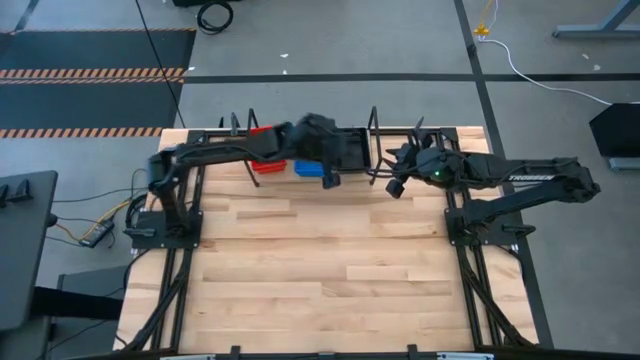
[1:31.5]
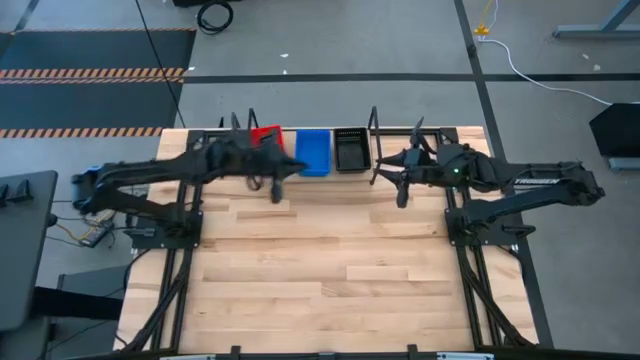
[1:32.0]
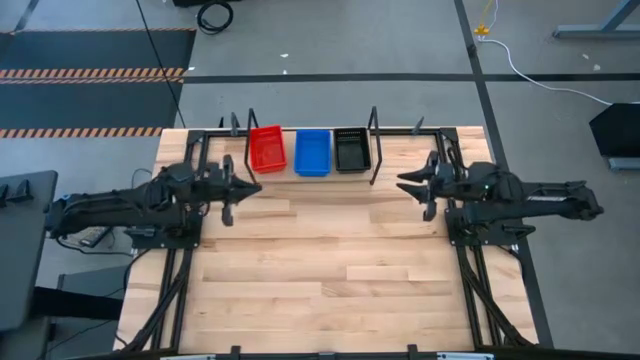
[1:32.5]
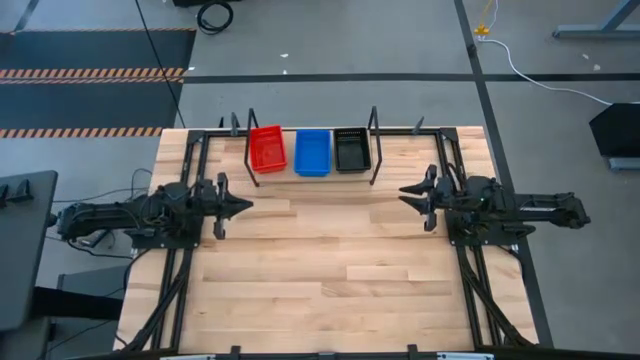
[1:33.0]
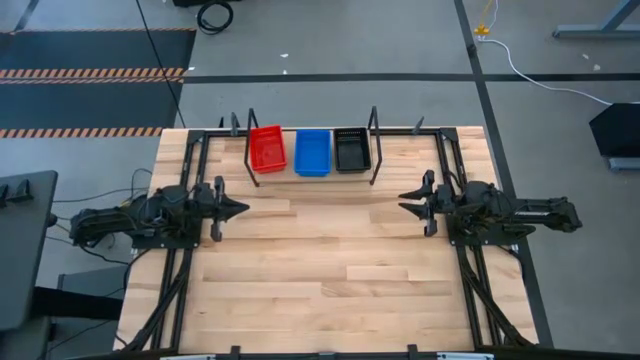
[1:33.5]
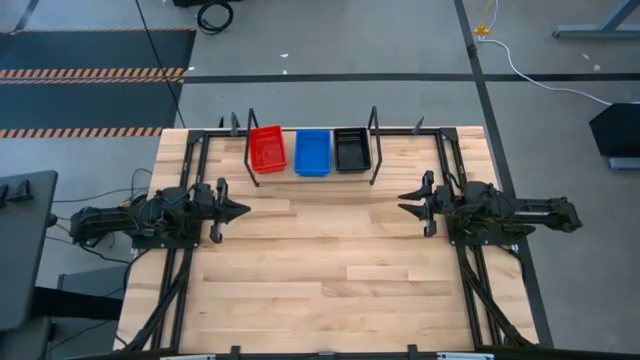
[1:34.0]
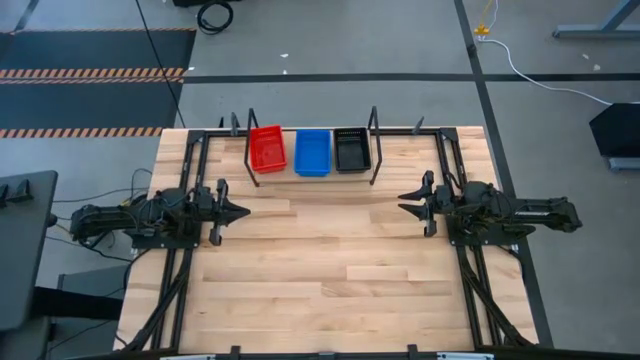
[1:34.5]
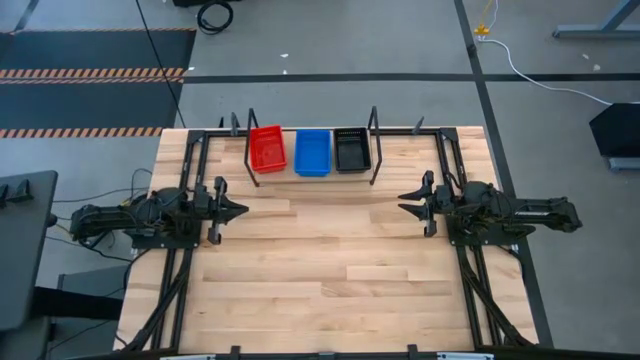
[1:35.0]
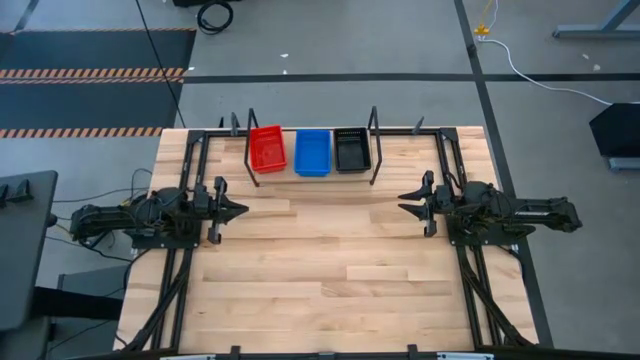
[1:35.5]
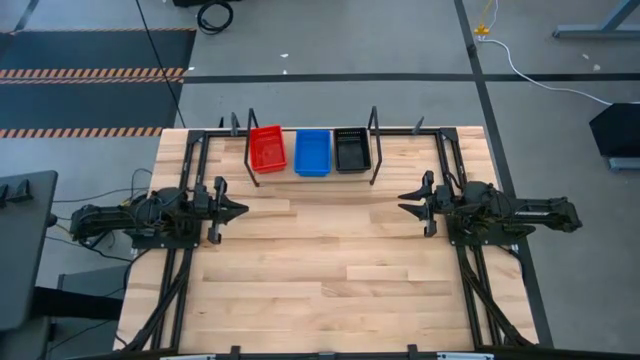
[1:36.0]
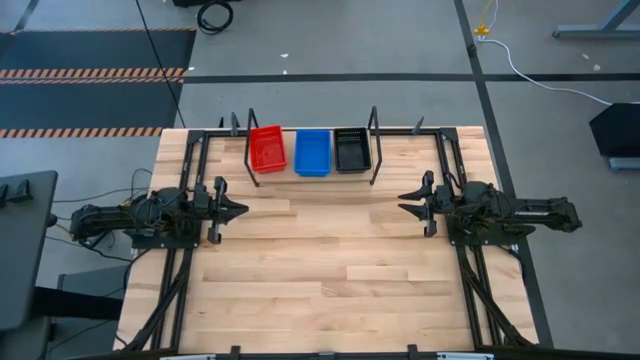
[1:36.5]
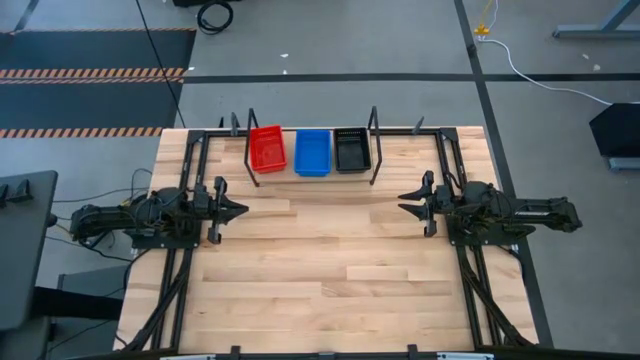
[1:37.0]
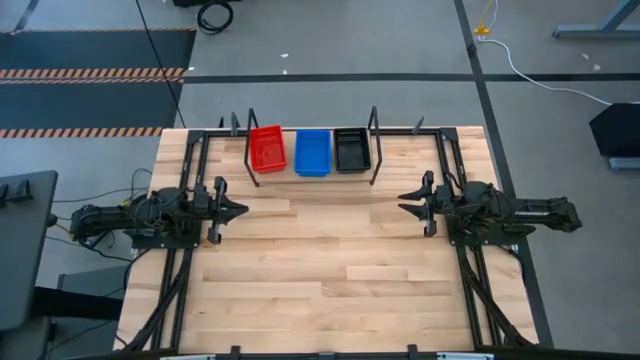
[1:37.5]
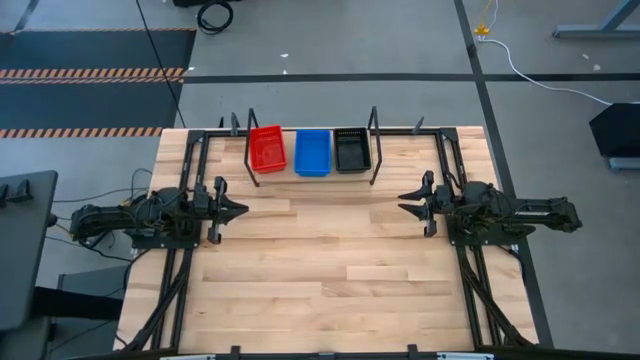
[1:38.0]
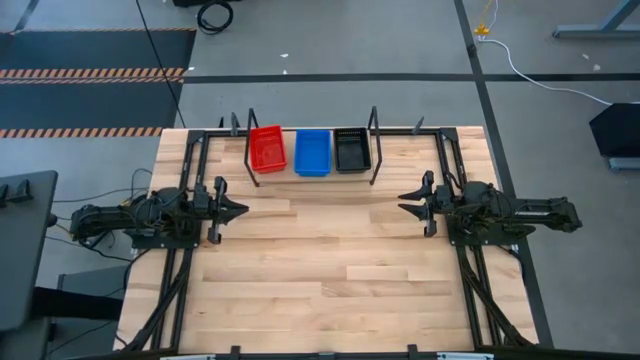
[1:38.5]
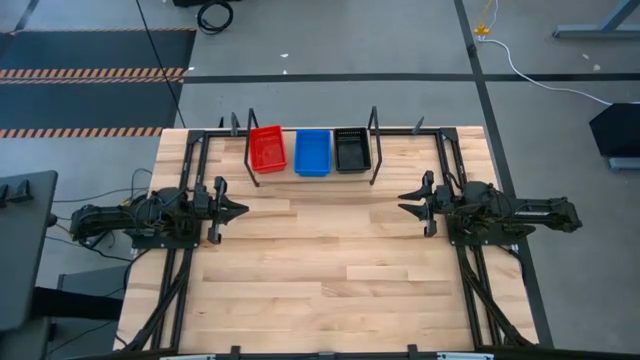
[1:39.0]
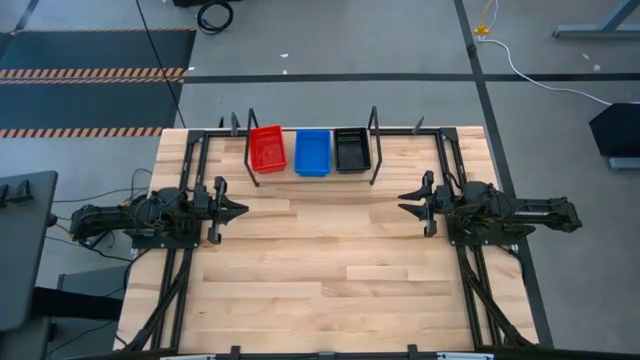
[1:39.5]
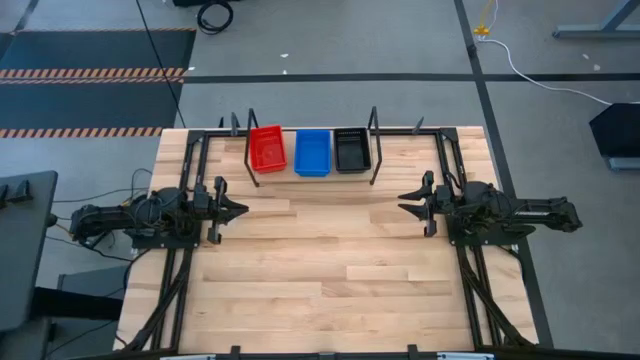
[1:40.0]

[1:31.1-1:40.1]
Task: Stack baskets on shelf by color
Return to Home Position

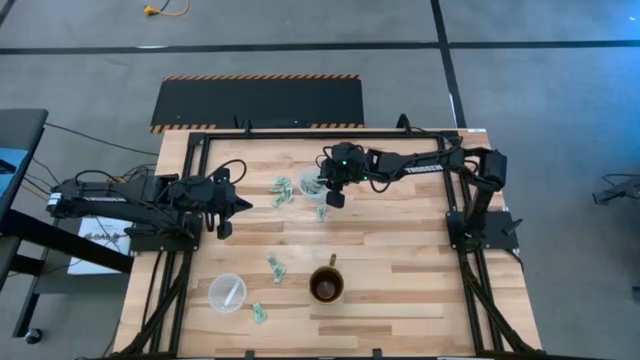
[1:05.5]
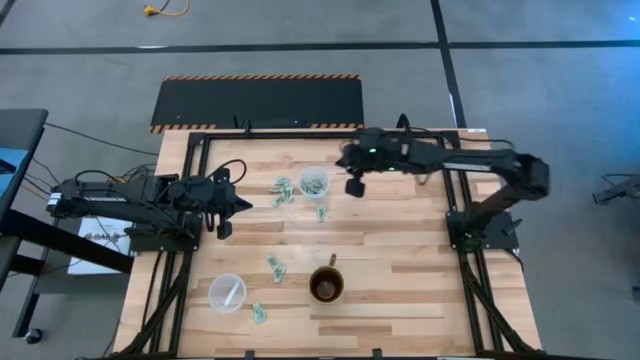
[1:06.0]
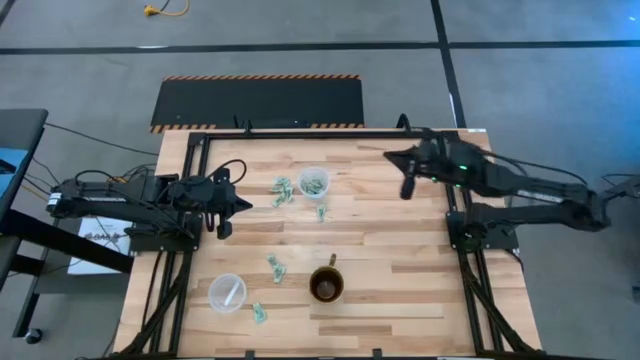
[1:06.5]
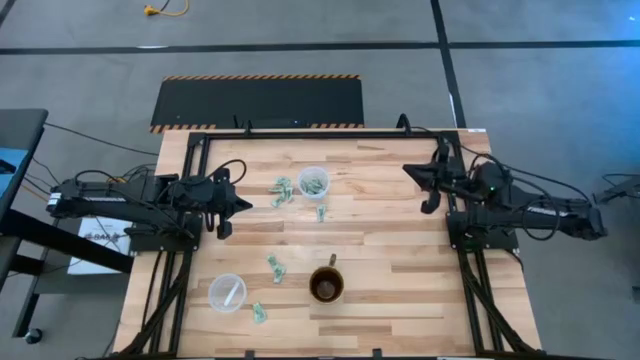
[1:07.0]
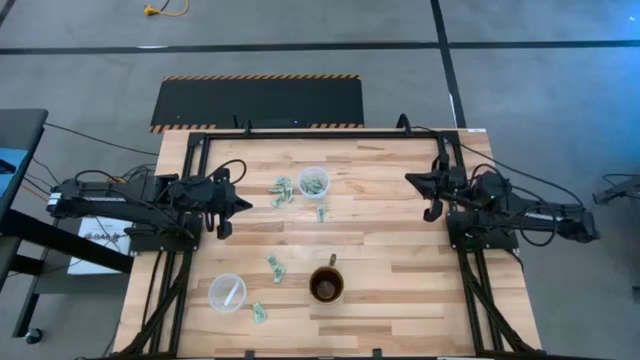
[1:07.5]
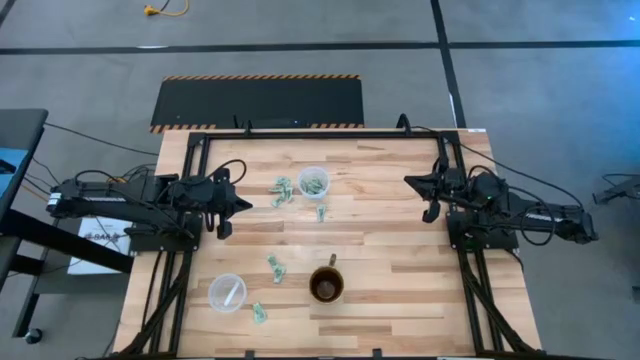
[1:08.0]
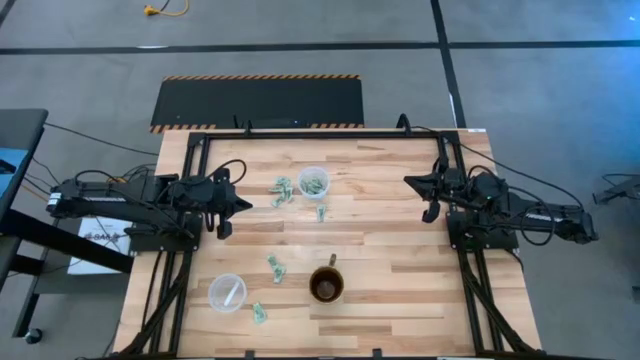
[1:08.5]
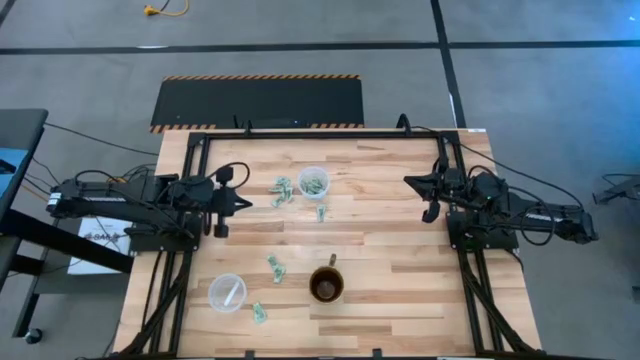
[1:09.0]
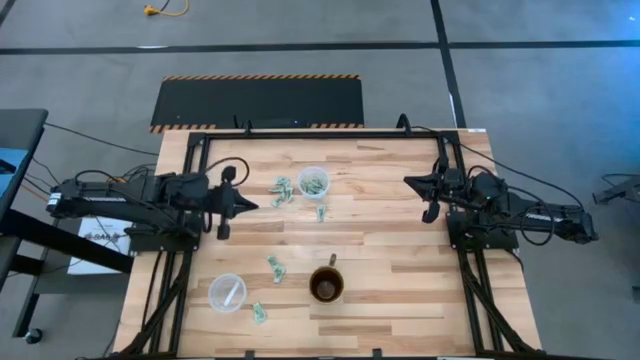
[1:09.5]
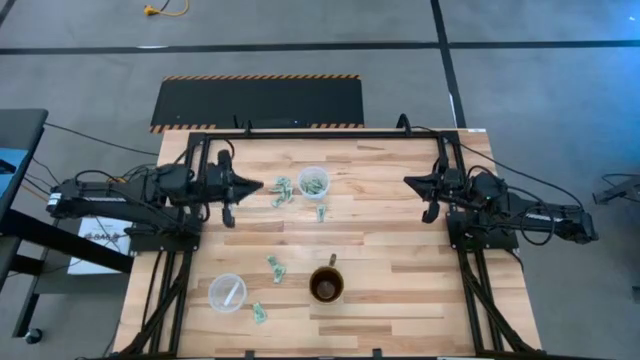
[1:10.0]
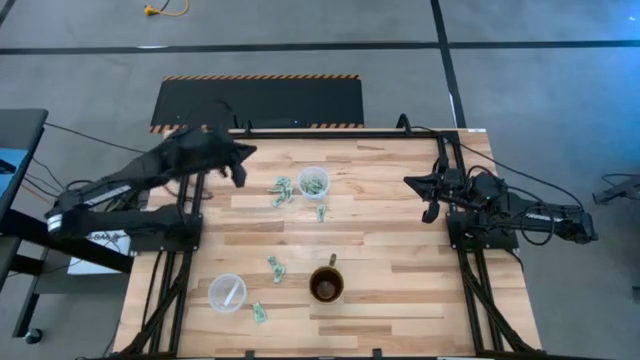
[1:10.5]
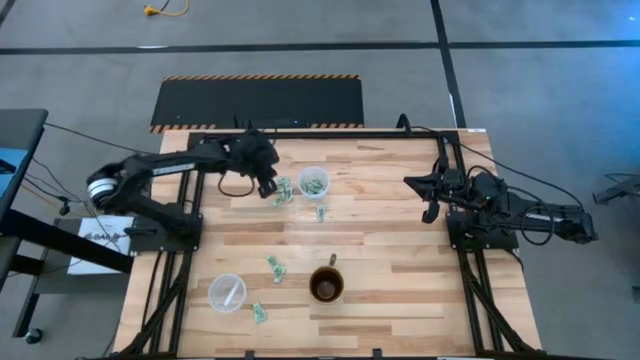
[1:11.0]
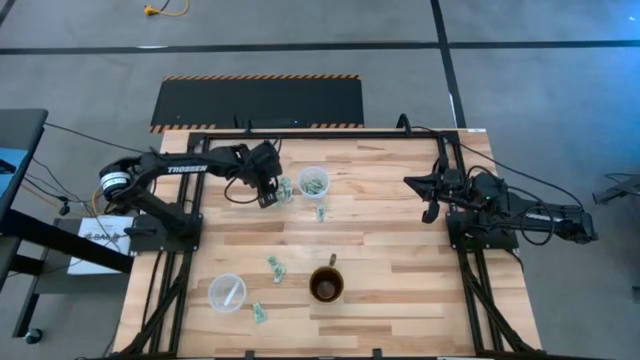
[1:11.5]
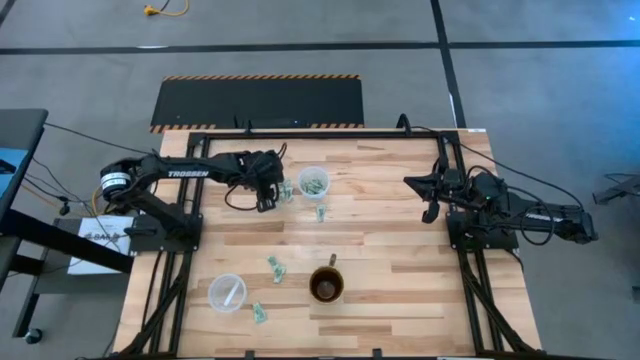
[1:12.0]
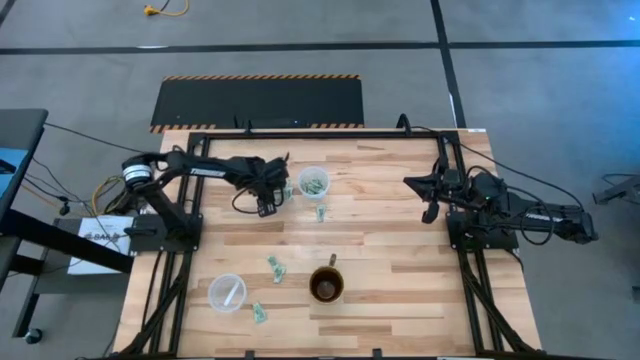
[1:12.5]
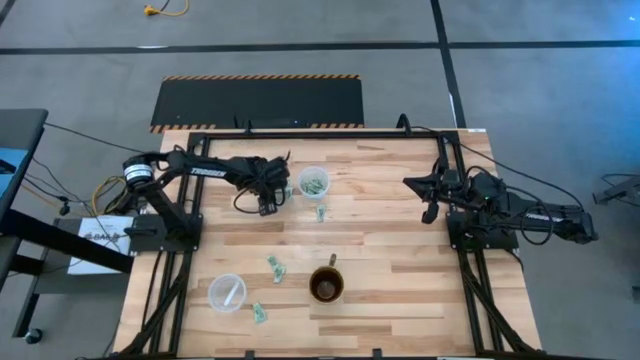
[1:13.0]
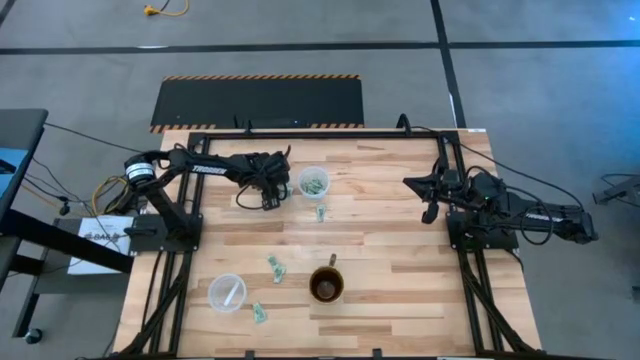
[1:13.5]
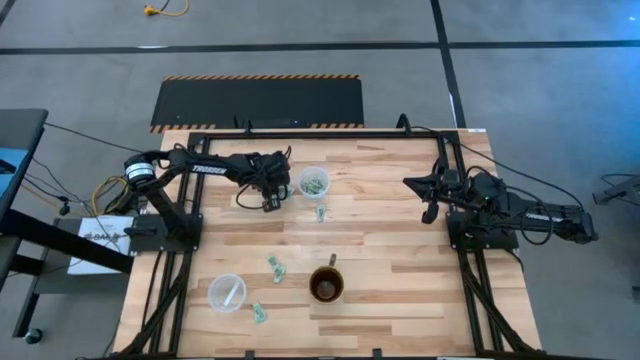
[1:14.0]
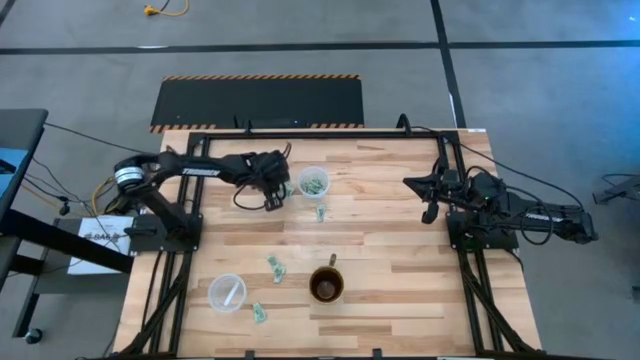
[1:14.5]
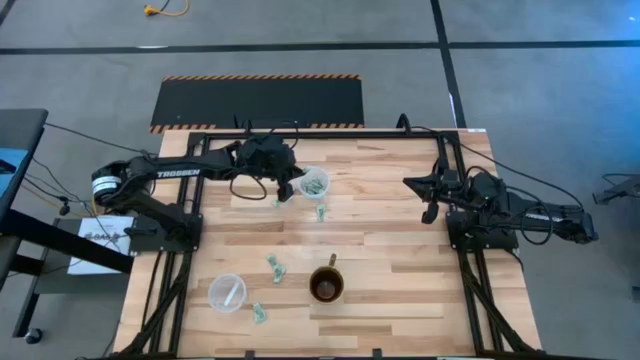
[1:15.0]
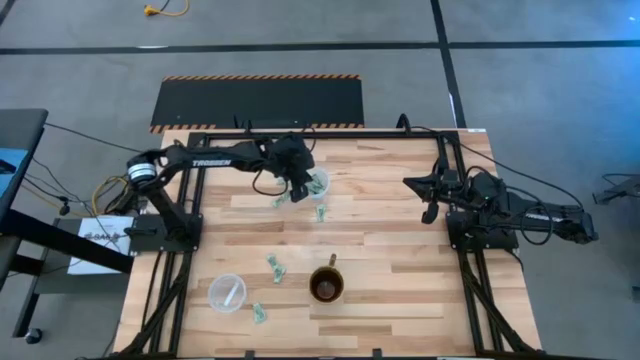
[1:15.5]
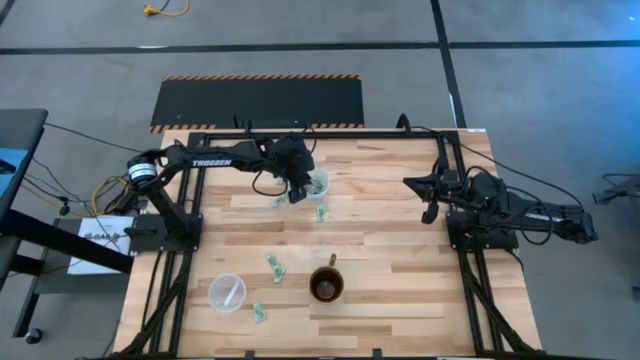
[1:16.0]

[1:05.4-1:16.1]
Task: Pick and place items into bin
Put the stevia packet into the top transparent bin
